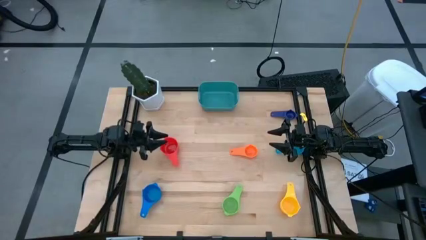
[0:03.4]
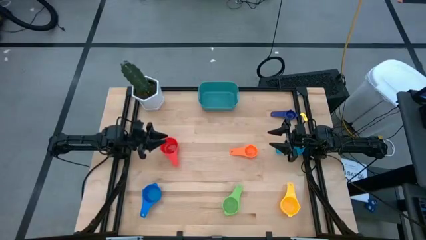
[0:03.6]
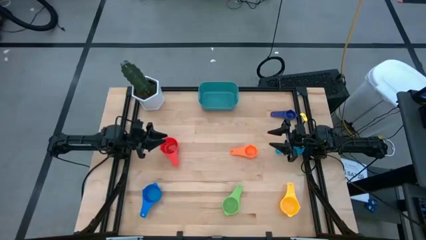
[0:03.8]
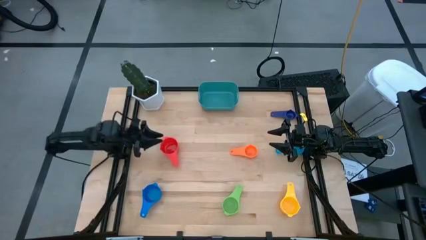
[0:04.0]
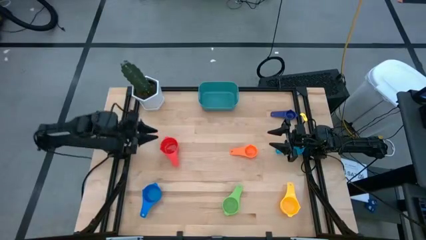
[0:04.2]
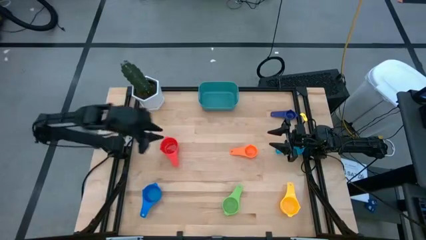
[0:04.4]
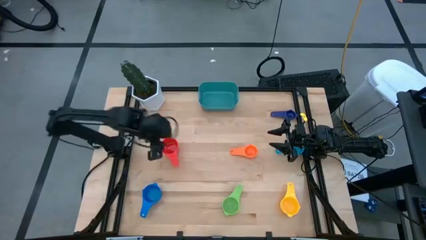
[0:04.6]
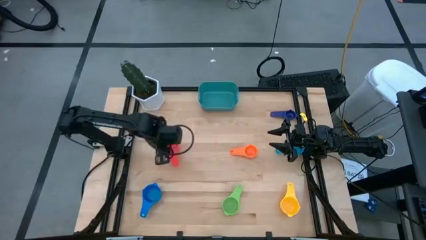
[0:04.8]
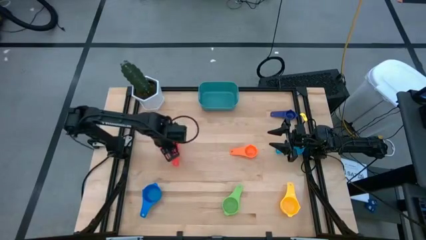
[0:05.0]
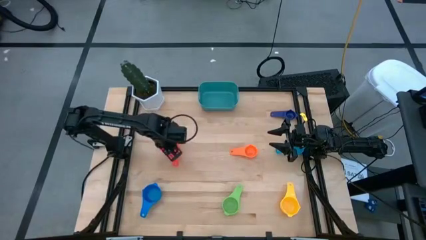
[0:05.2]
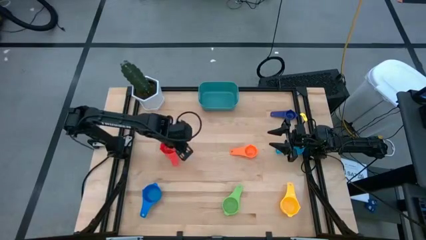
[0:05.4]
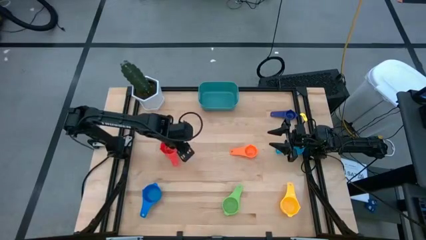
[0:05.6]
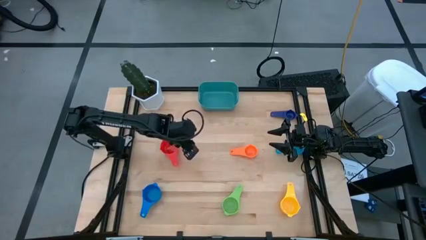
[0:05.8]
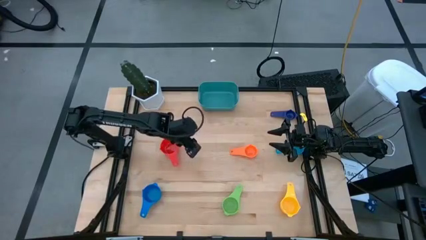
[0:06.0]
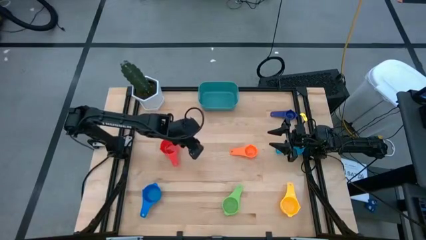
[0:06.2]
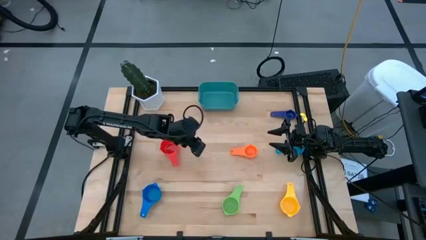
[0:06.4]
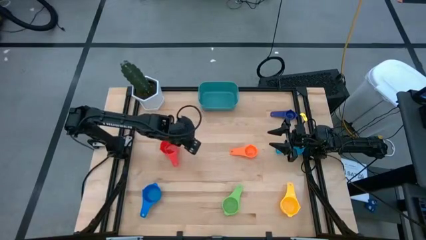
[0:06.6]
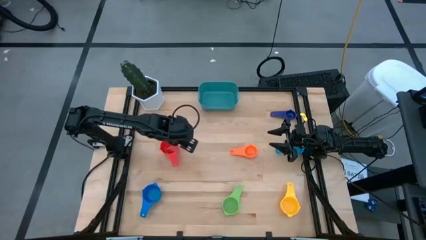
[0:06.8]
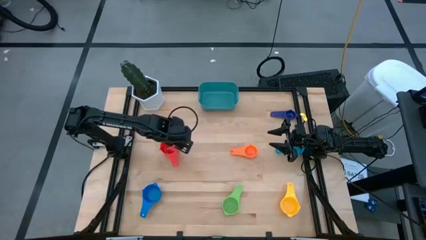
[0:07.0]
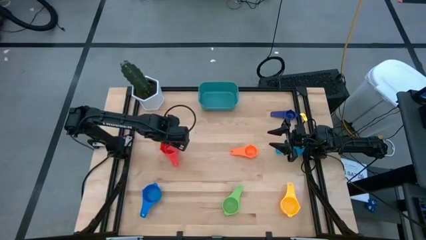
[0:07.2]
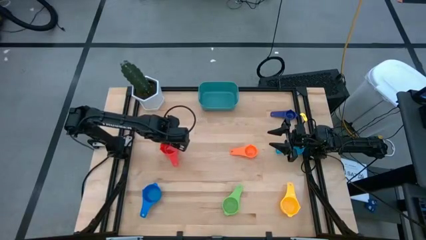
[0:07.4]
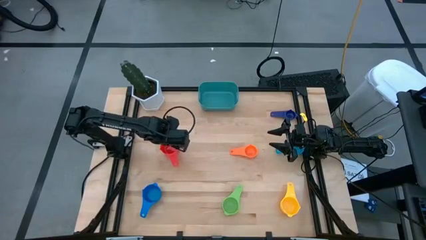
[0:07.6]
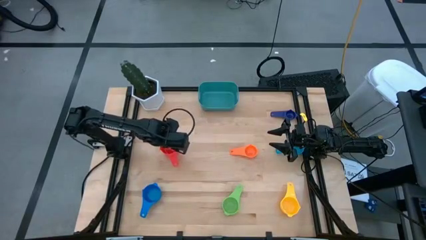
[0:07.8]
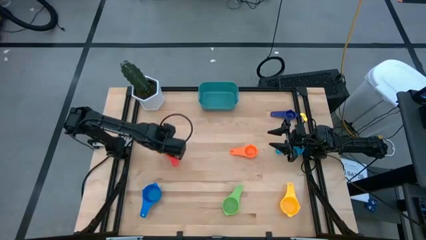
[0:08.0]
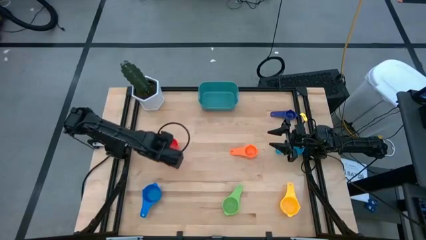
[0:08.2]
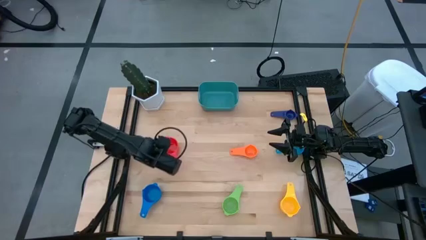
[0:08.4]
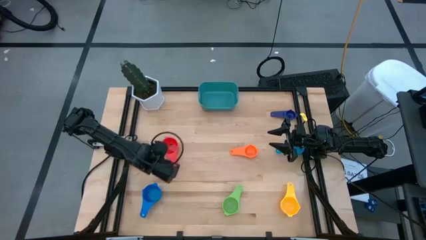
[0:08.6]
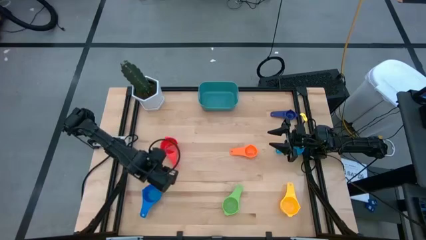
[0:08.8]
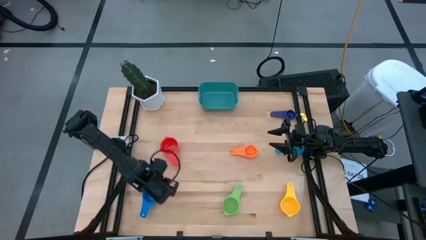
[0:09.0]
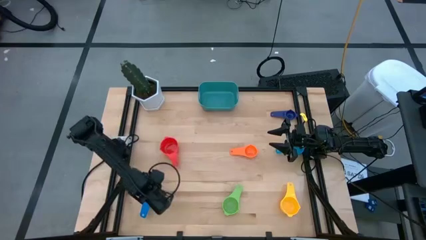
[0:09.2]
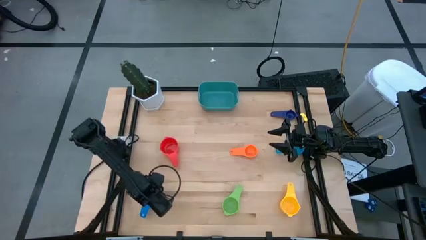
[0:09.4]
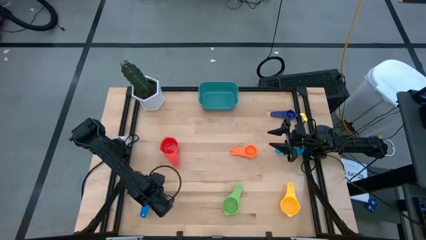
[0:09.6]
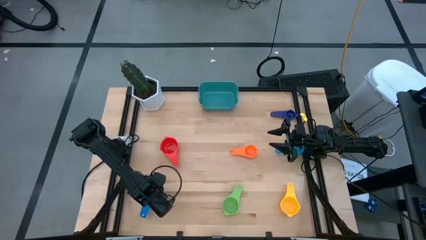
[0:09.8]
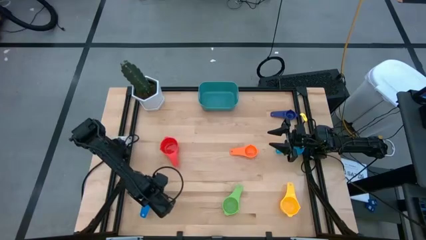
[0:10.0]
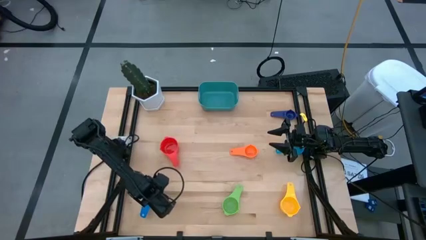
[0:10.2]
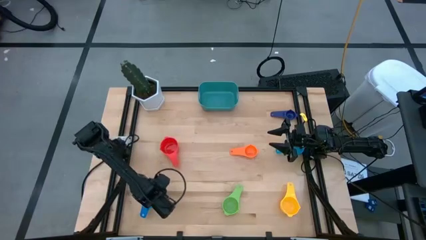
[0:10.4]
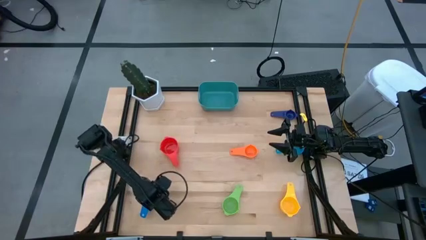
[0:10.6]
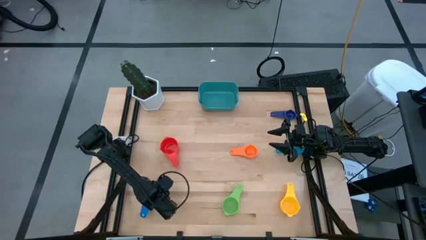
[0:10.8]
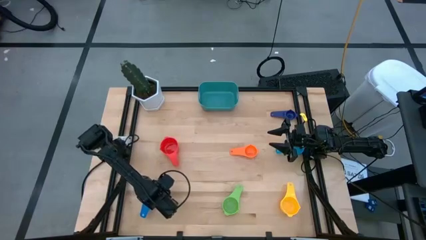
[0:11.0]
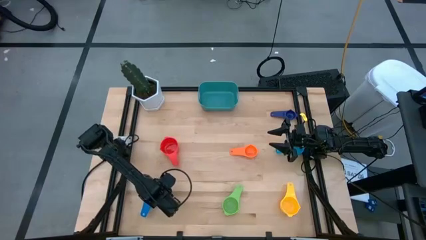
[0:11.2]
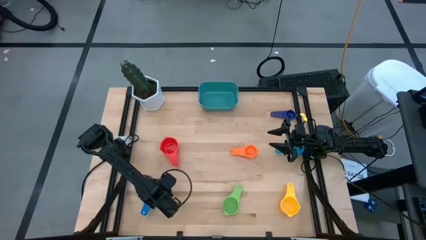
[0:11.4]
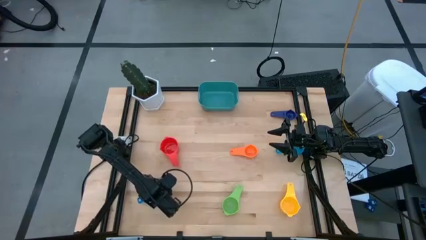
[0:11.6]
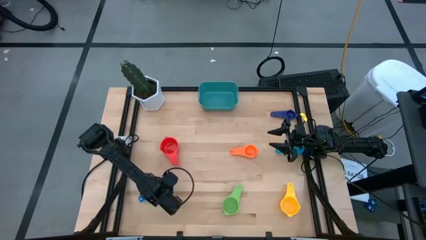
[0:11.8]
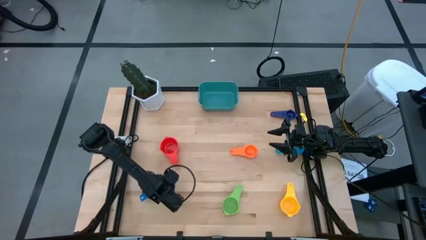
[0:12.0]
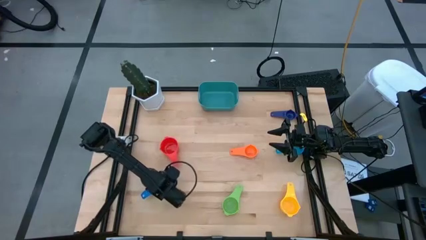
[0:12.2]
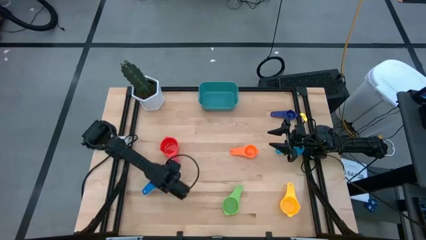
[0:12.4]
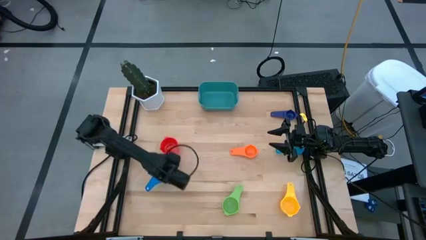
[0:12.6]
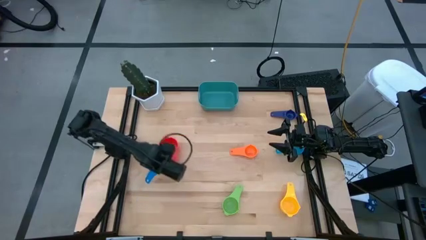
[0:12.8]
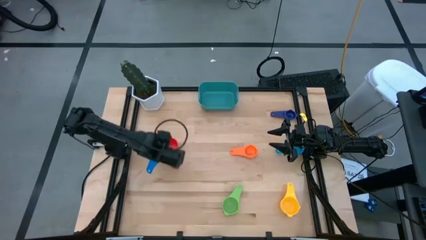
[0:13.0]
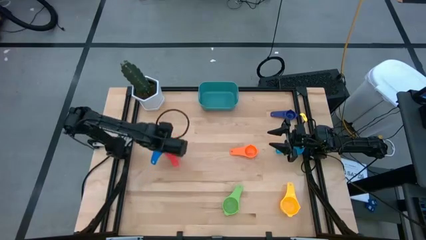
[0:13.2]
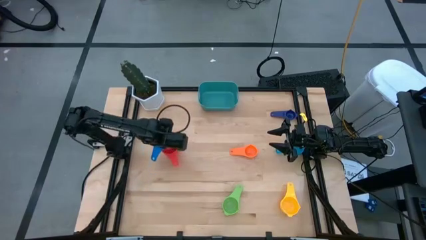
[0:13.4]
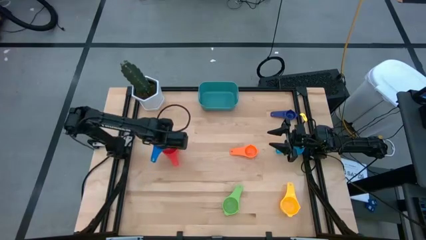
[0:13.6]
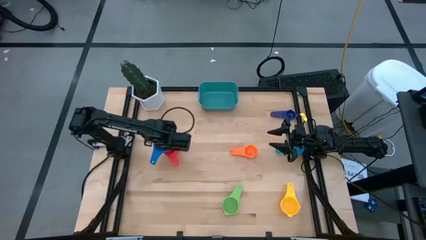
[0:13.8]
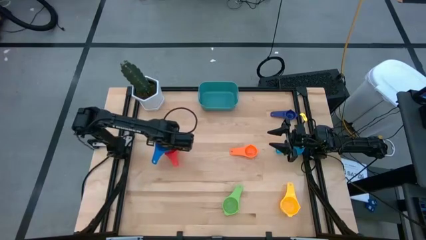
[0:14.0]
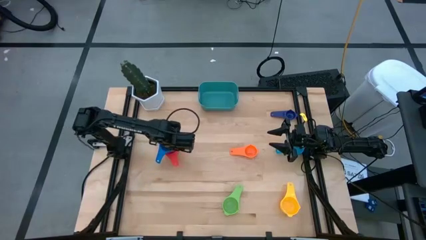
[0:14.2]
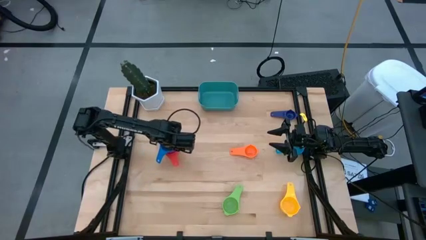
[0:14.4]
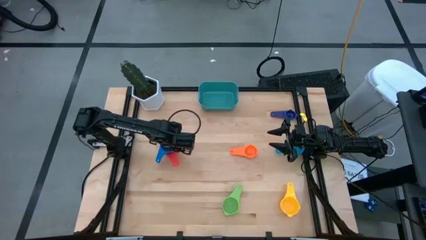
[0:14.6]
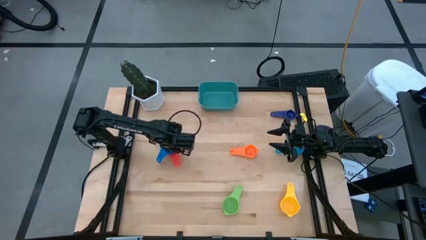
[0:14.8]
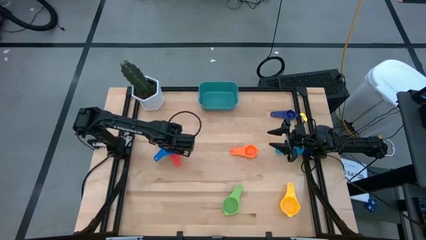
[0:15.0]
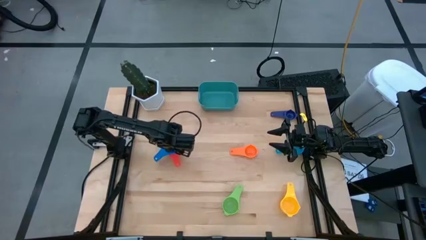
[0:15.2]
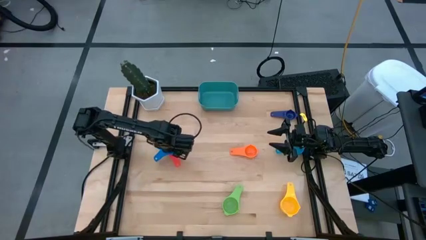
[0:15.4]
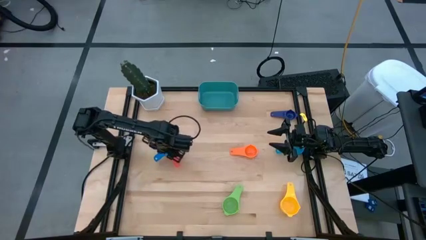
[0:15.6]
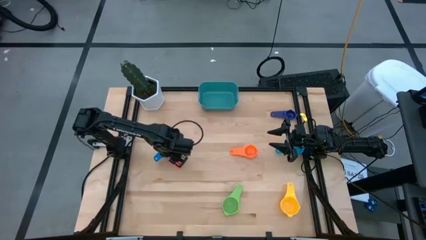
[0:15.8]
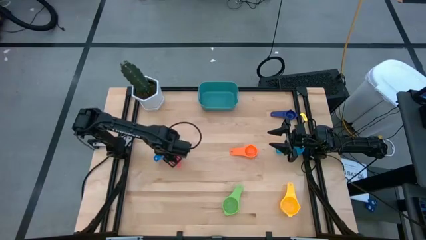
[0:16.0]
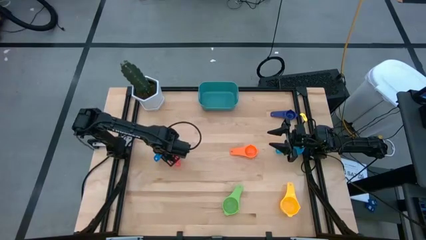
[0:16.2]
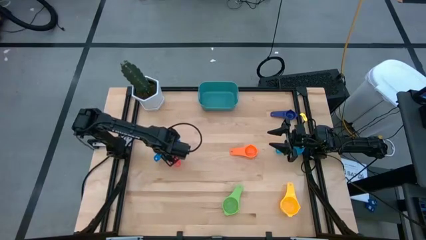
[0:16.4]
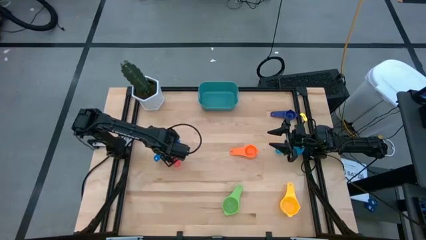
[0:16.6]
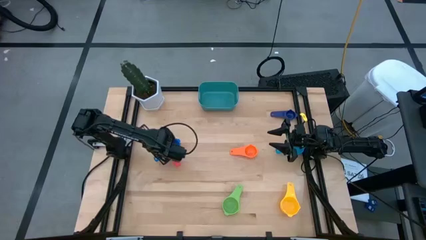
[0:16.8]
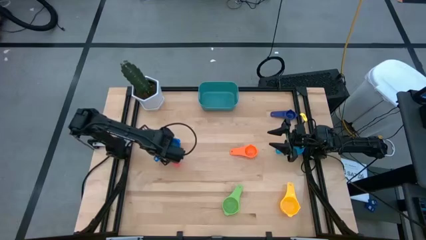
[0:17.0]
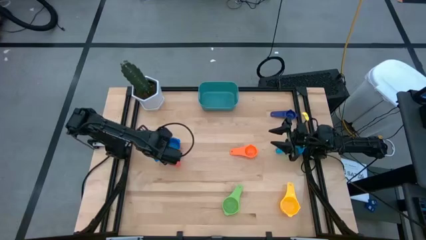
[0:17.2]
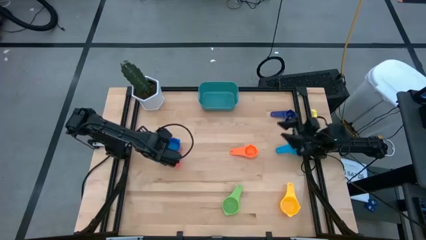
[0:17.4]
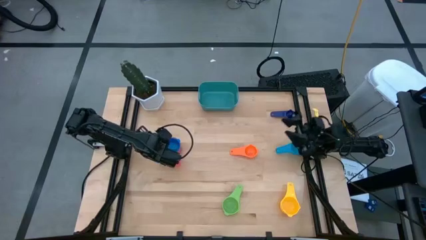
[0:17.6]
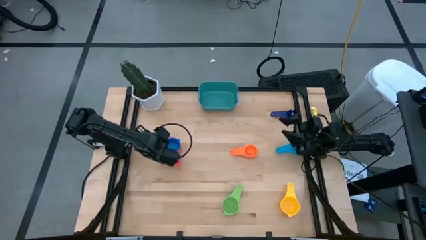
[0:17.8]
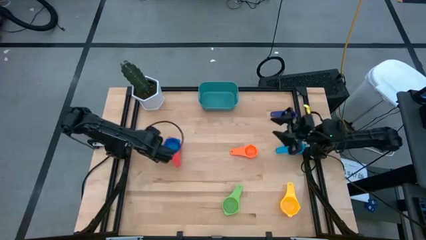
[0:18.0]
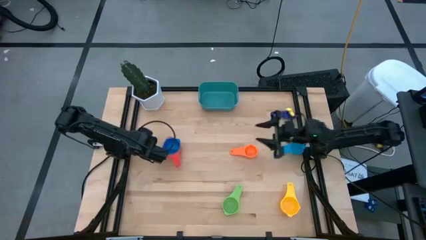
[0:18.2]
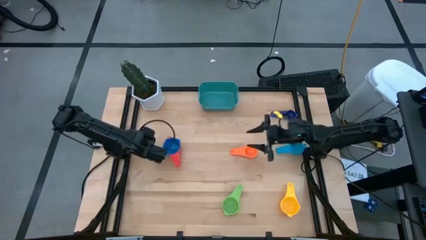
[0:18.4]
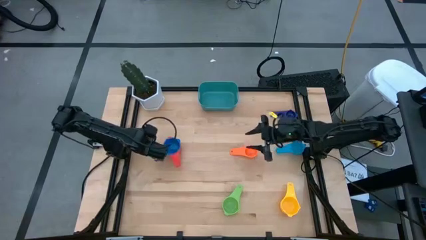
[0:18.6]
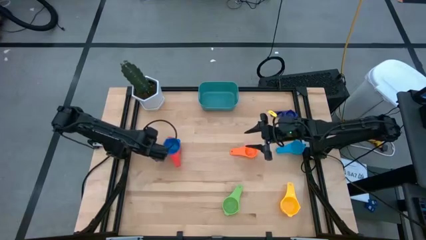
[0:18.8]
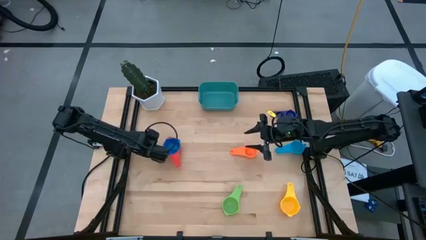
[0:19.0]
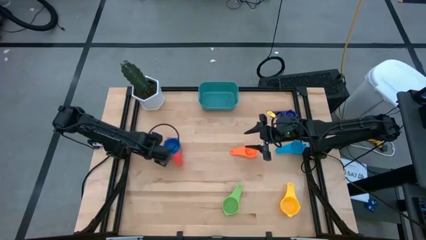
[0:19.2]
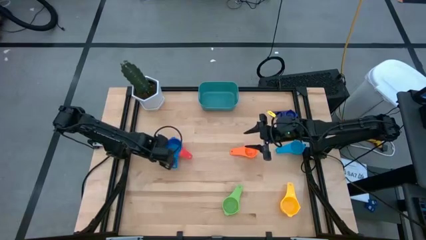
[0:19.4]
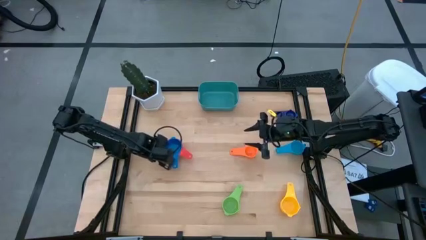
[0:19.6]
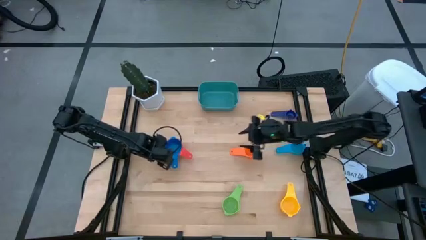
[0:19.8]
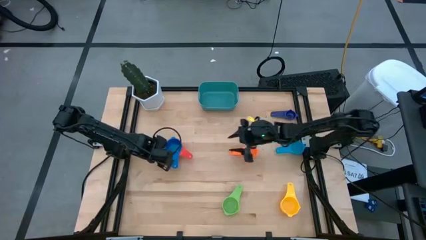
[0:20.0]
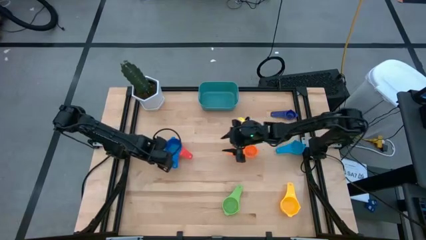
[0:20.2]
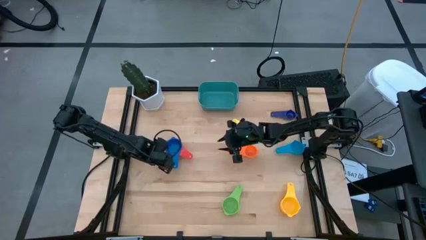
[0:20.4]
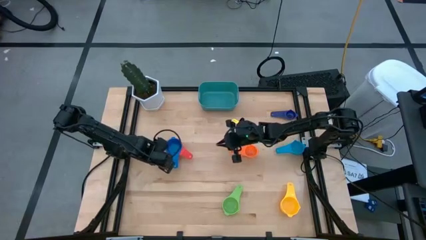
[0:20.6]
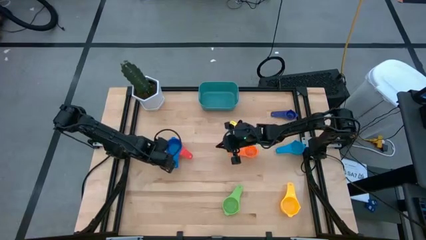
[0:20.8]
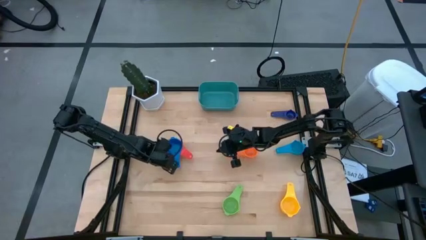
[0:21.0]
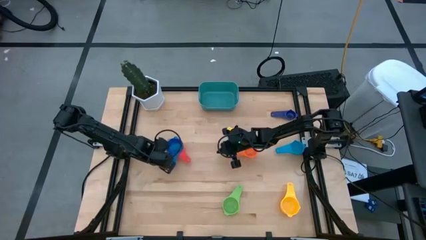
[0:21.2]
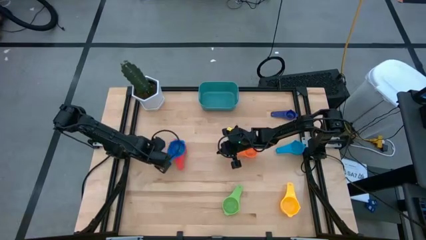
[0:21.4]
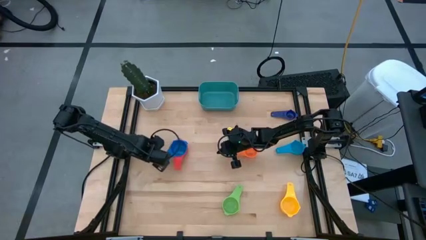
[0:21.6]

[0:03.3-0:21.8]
Task: Nest measuring cups in basket
Stack the blue measuring cup on the red measuring cup
